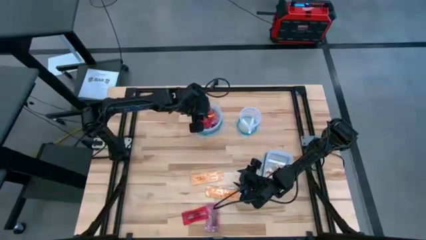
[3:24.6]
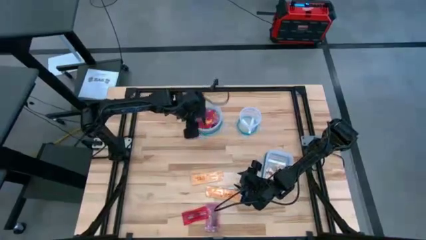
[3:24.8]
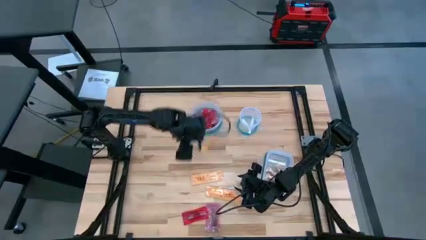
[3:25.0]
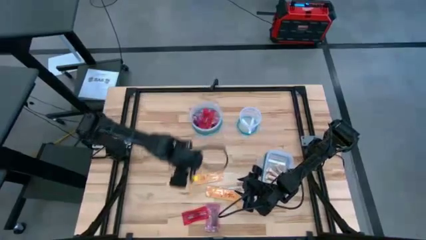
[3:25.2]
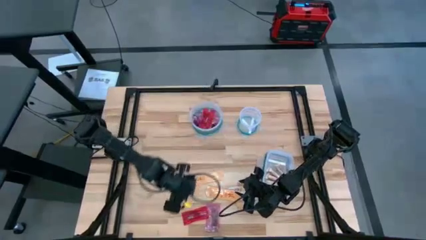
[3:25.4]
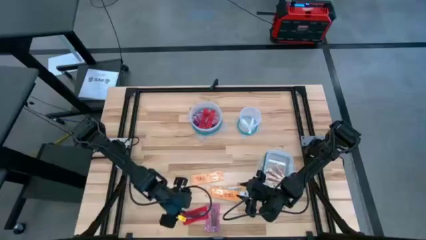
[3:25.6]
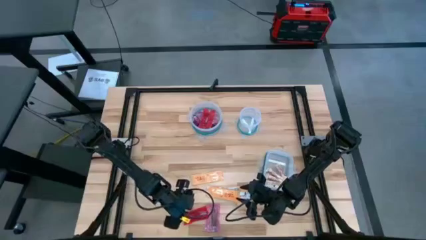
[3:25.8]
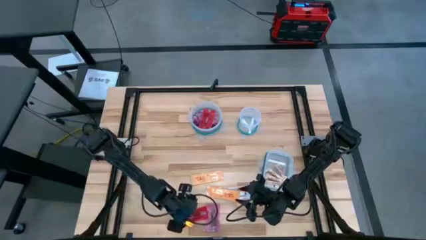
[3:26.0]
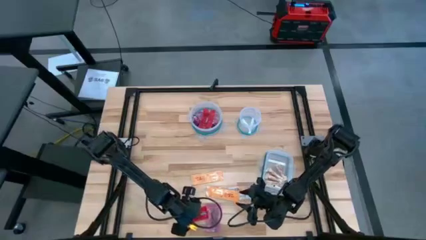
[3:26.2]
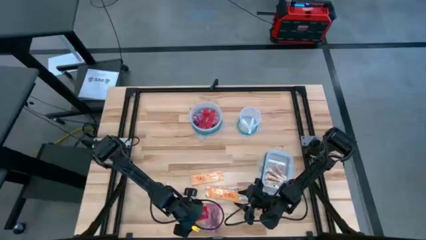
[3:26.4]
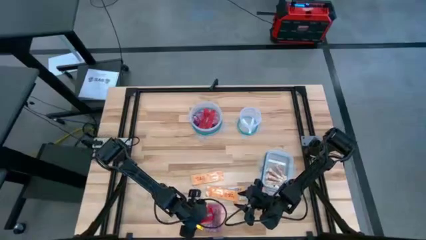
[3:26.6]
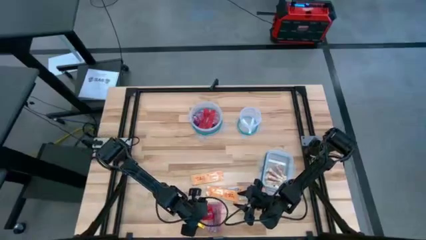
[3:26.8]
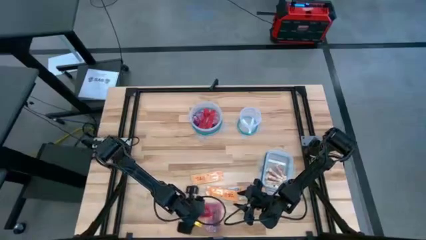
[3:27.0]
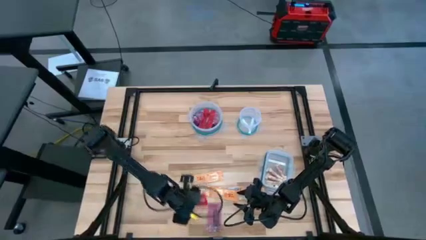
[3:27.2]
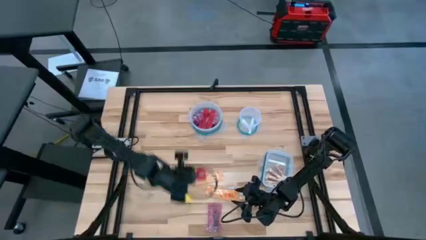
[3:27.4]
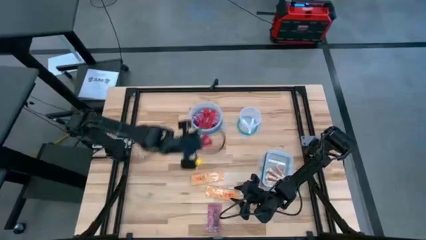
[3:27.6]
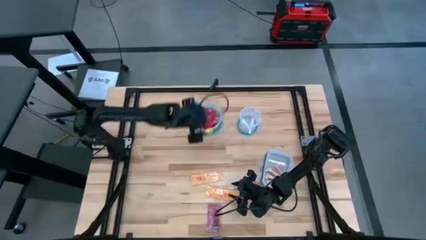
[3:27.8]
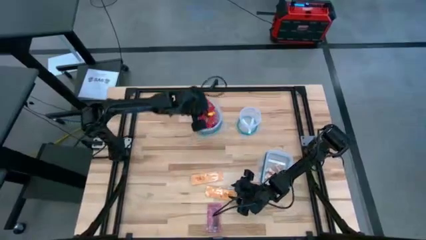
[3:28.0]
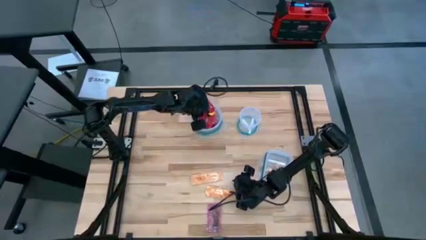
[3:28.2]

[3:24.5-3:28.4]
Task: Sort candy
Put the red candy into the big circular transparent bin

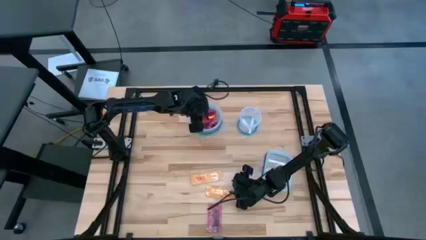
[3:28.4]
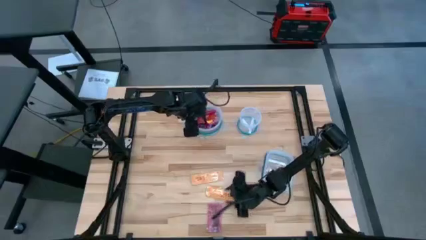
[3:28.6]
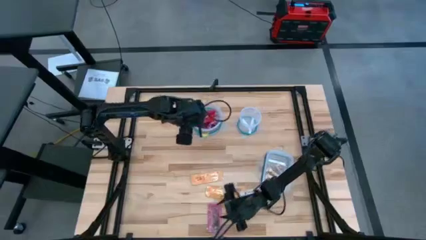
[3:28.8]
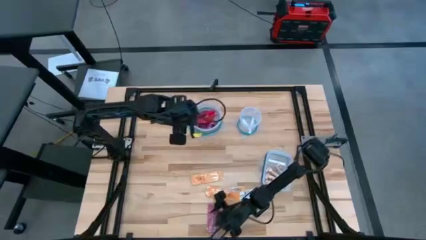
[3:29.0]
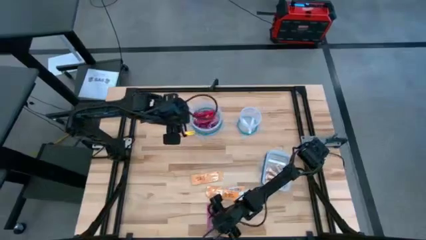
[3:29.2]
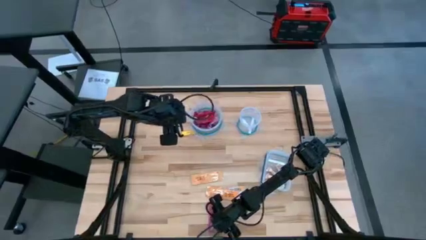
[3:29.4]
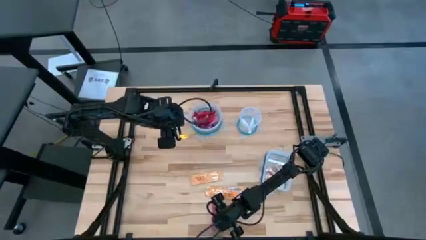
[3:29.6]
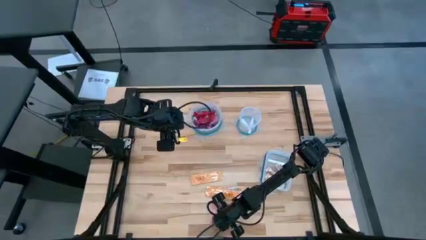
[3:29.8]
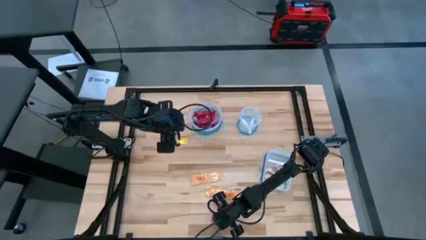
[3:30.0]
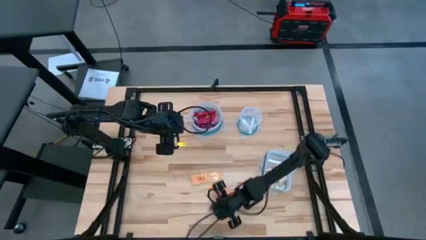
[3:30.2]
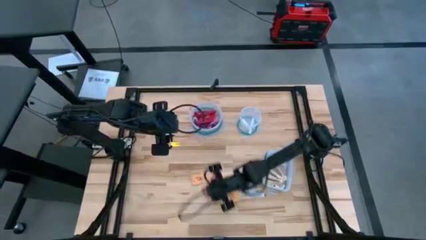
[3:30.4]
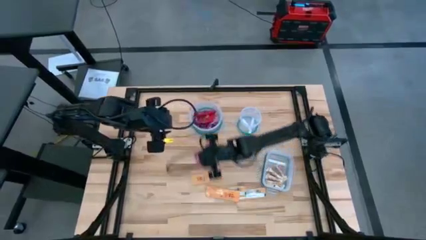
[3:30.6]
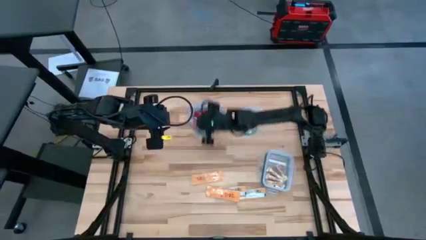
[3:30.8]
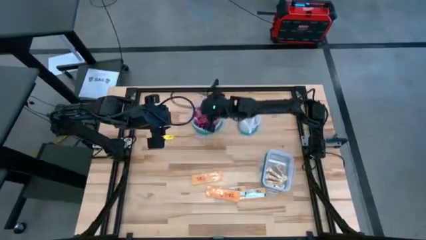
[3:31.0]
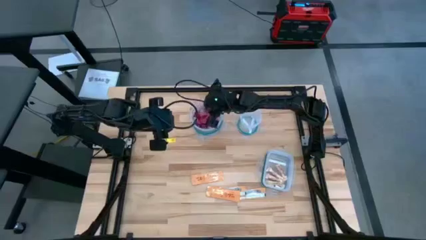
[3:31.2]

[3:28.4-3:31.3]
Put the red candy into the big circular transparent bin

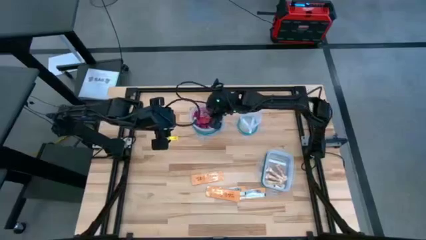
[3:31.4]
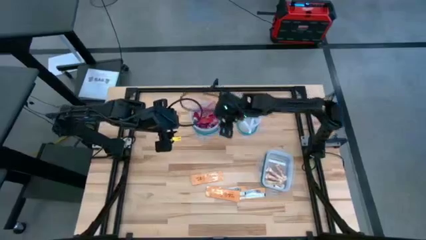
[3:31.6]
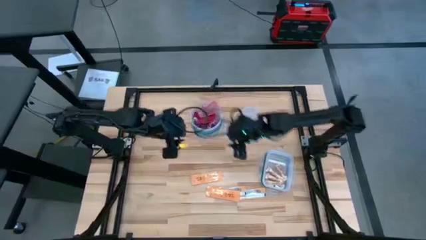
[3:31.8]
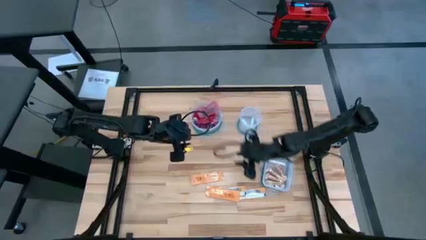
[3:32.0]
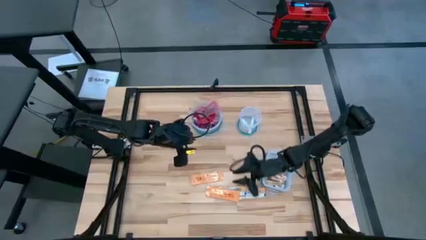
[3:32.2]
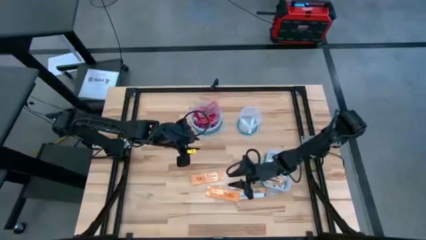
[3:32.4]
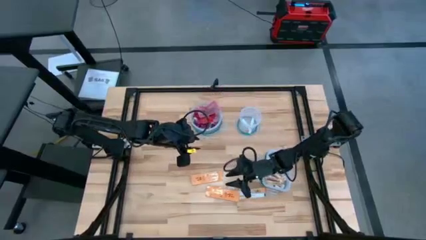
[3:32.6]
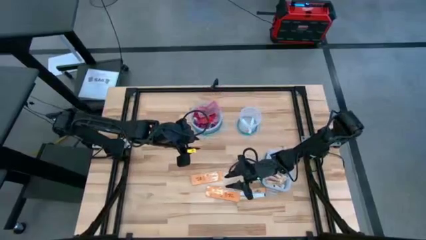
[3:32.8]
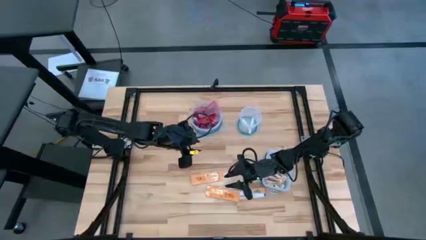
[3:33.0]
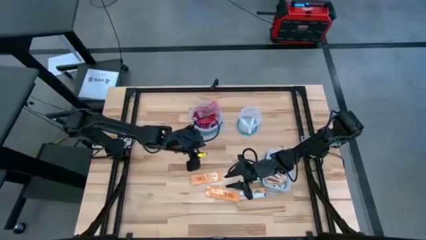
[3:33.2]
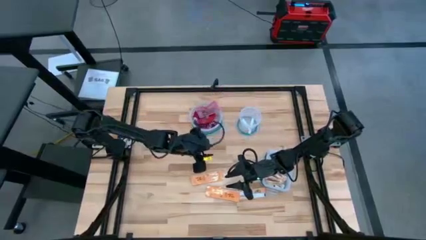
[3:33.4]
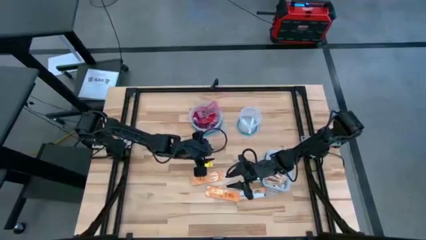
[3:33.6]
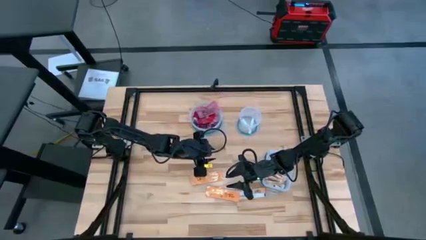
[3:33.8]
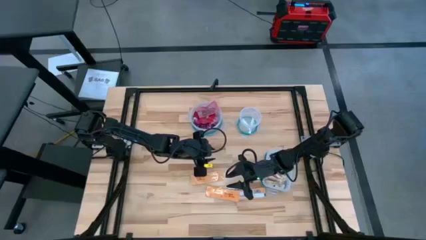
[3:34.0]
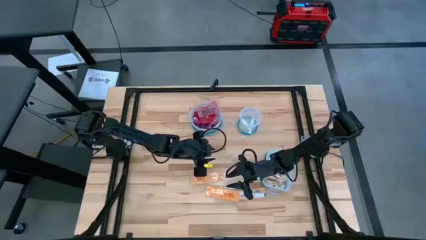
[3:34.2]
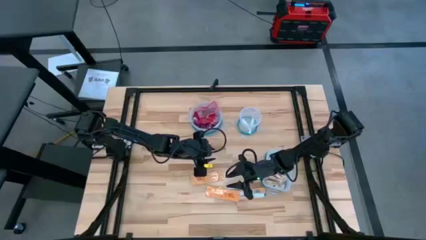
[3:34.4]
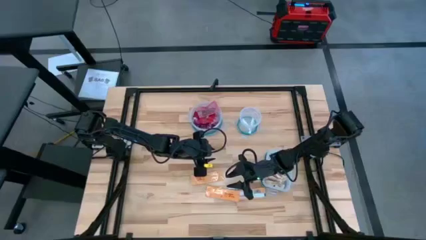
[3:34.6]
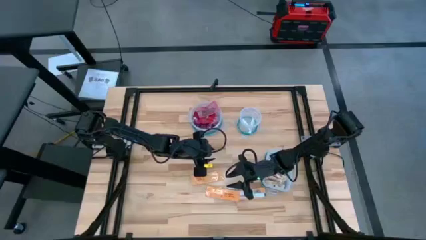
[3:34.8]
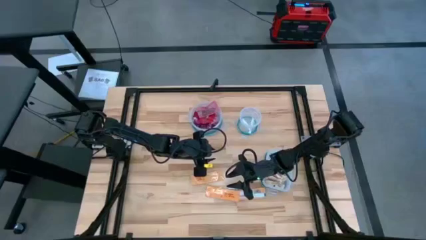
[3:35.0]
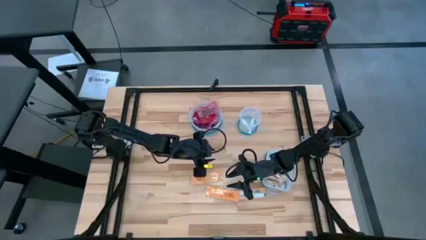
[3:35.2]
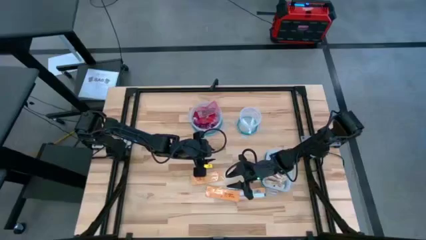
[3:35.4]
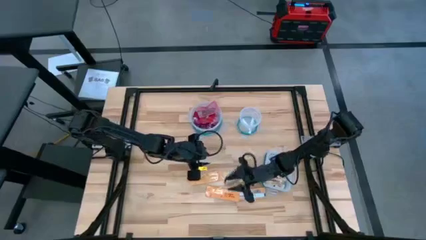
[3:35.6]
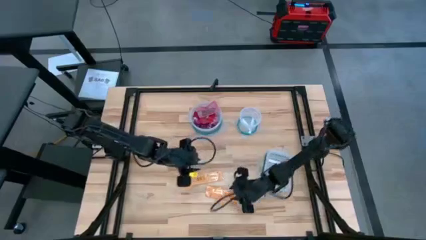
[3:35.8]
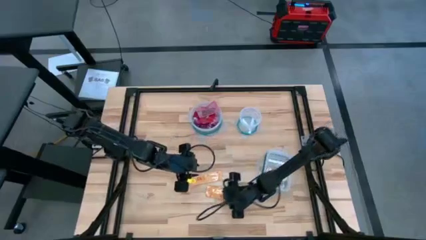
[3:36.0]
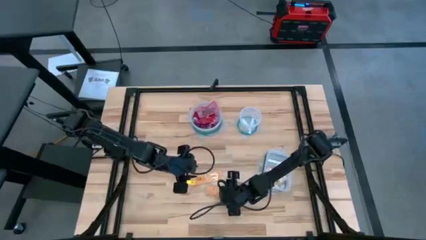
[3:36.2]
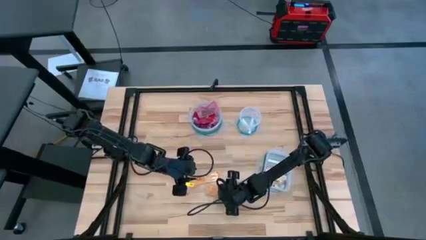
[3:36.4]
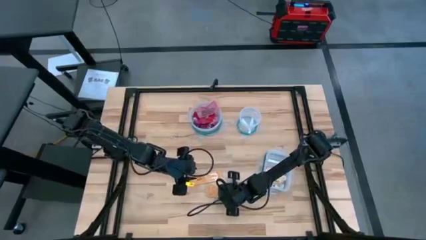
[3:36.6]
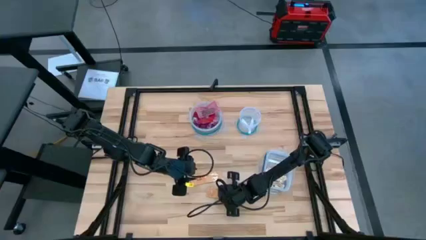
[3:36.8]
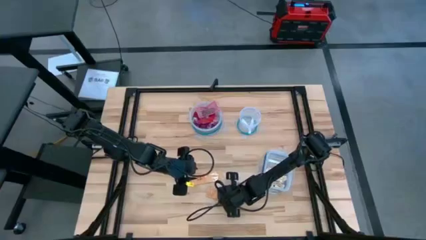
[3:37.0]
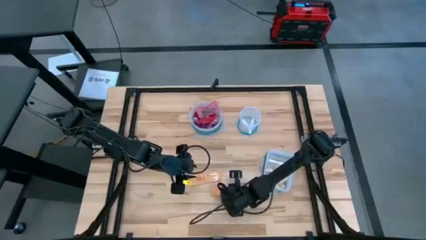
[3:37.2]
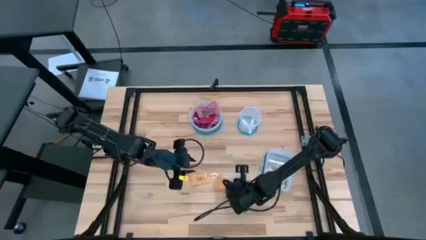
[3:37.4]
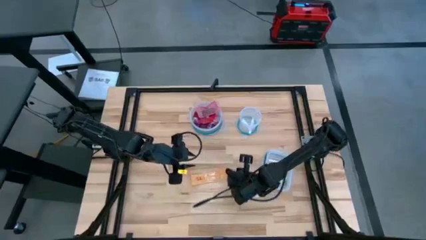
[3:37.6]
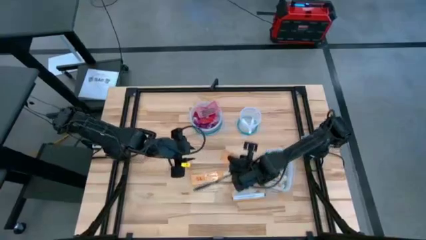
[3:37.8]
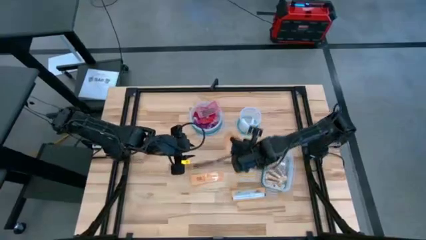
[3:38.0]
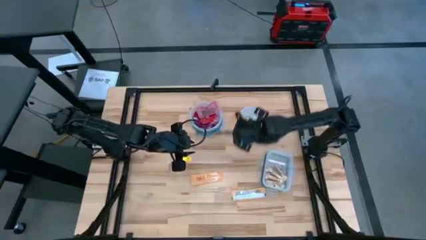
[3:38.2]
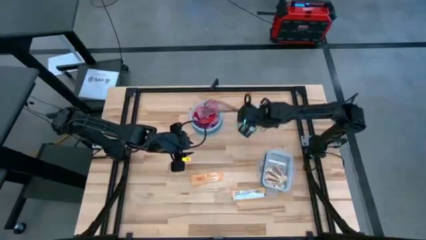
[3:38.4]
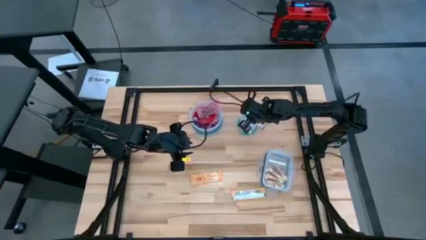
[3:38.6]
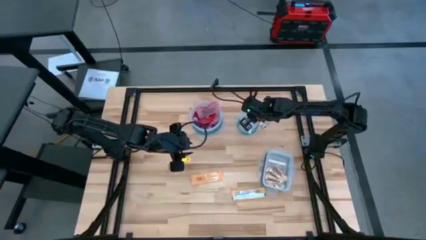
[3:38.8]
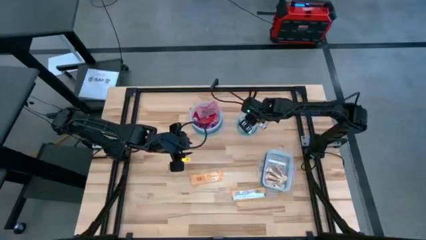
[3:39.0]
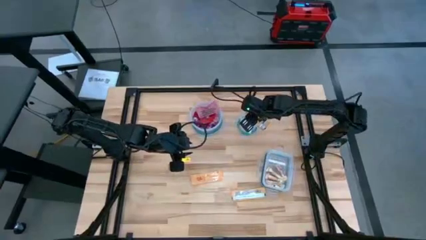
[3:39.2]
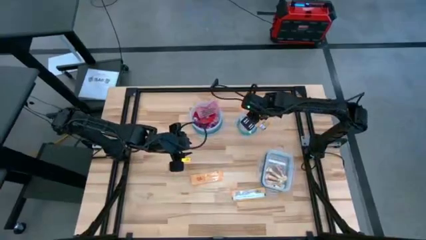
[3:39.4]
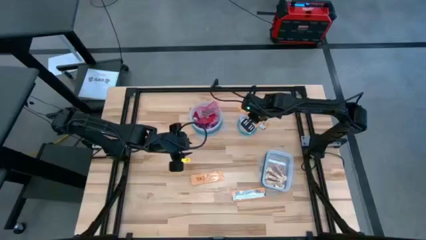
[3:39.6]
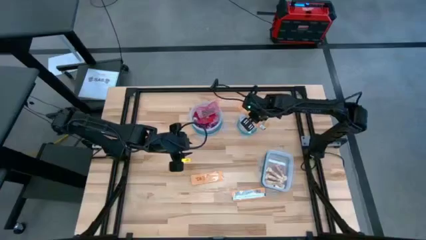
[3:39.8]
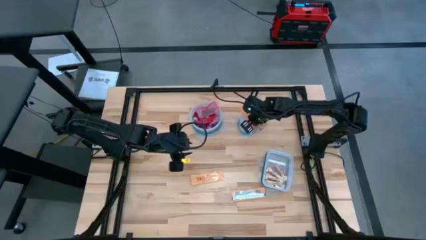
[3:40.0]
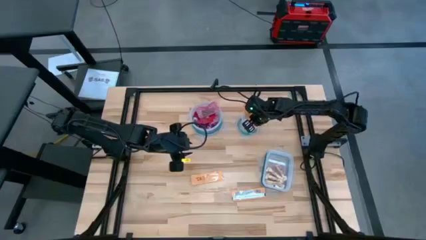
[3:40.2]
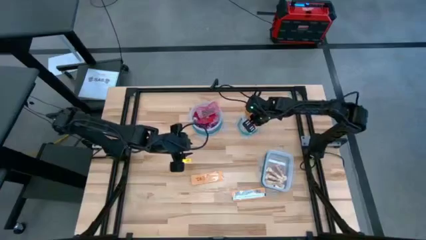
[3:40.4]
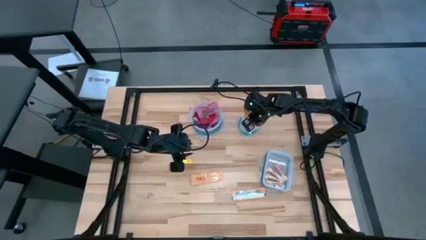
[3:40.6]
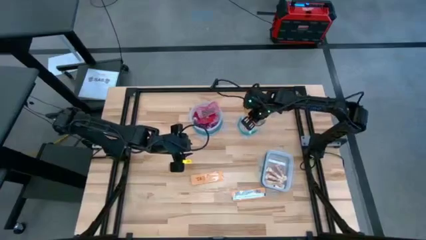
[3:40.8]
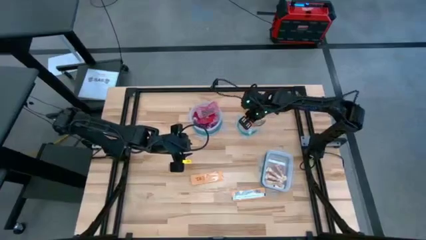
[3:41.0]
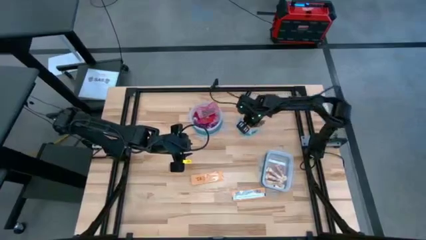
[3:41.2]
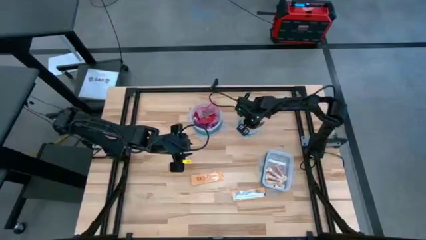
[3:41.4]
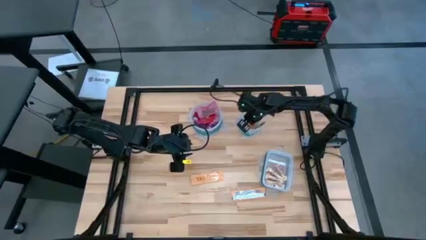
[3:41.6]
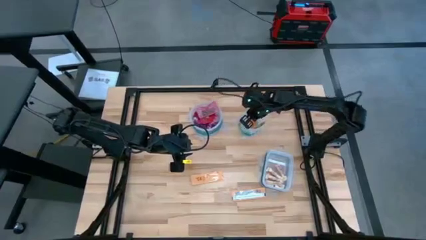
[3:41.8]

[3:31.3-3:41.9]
Put the yellow candy strip into the small circular transparent bin
